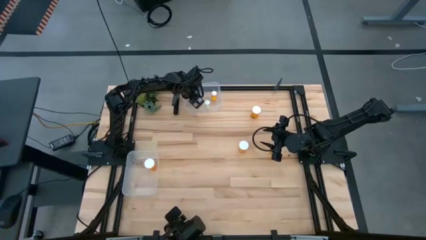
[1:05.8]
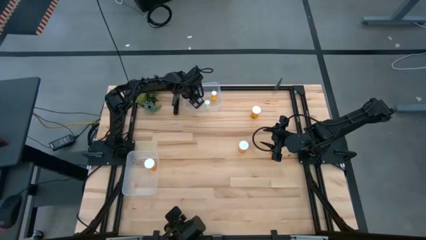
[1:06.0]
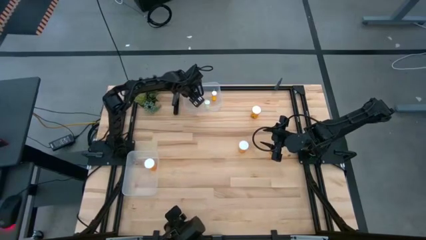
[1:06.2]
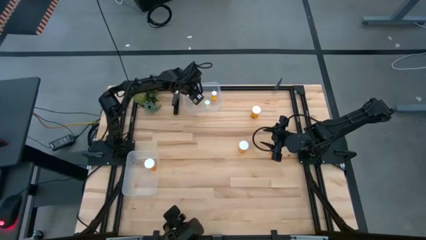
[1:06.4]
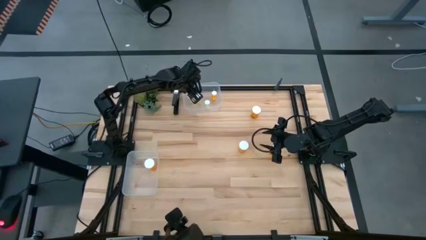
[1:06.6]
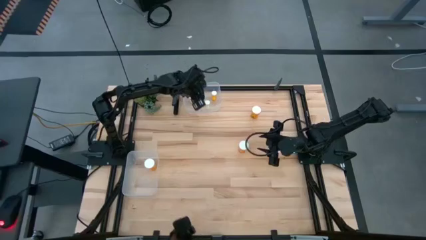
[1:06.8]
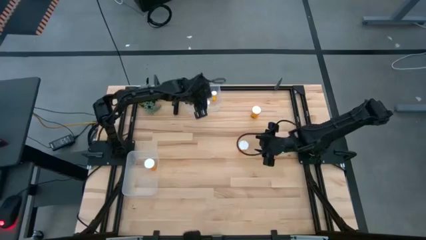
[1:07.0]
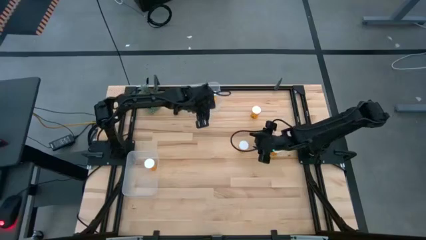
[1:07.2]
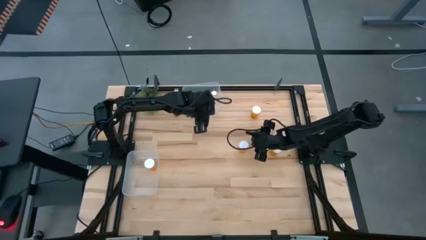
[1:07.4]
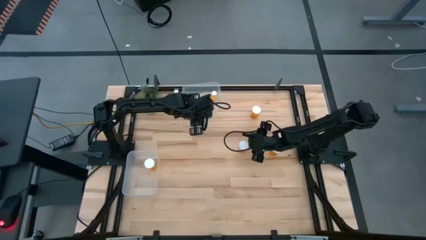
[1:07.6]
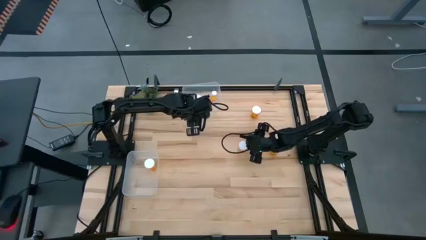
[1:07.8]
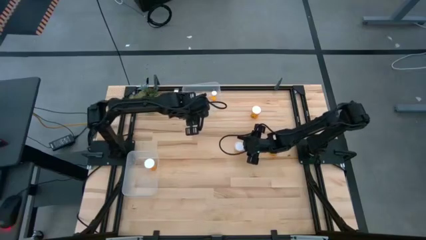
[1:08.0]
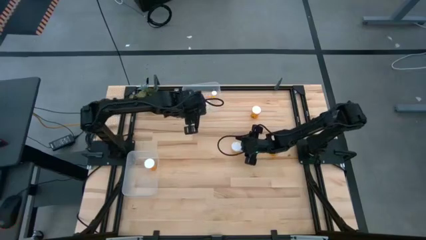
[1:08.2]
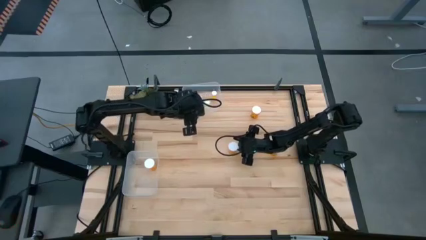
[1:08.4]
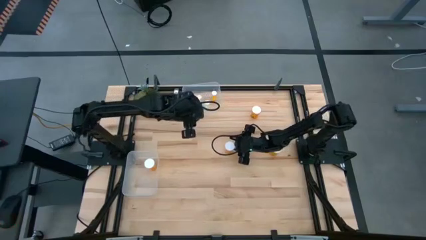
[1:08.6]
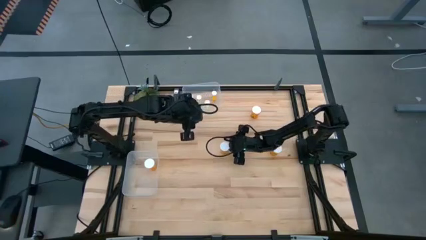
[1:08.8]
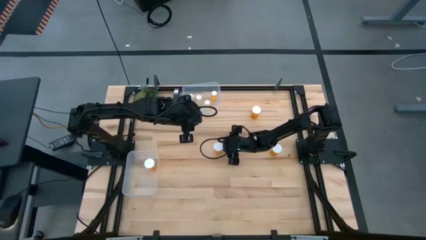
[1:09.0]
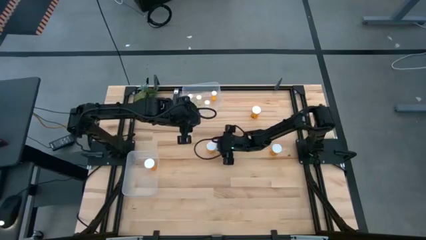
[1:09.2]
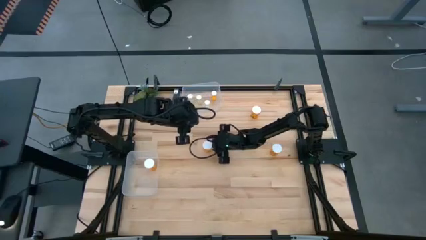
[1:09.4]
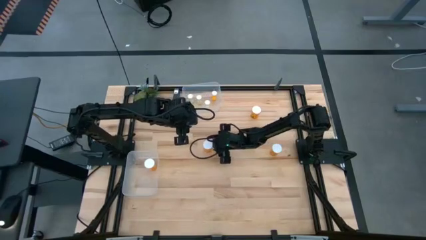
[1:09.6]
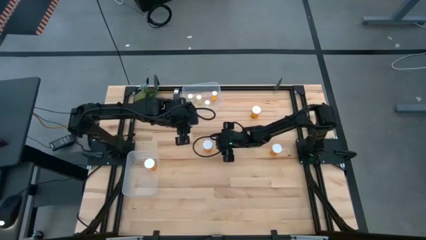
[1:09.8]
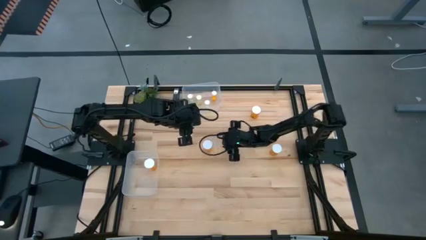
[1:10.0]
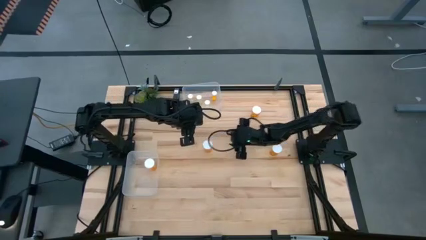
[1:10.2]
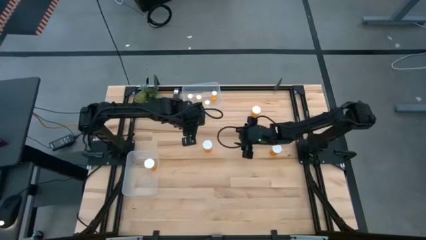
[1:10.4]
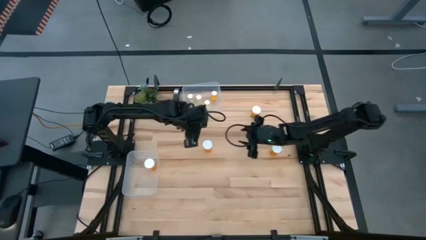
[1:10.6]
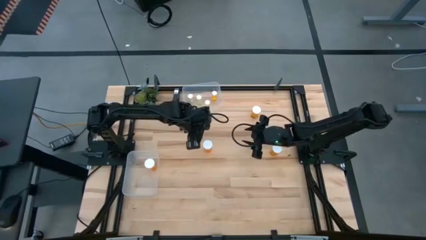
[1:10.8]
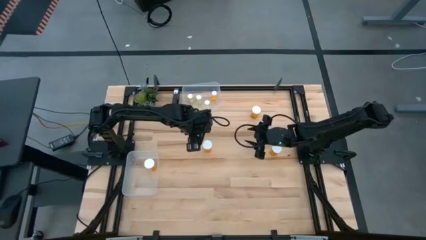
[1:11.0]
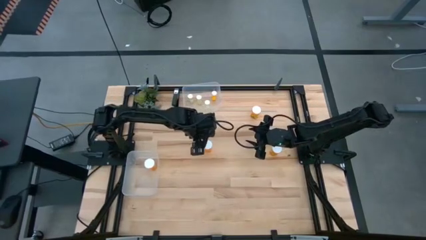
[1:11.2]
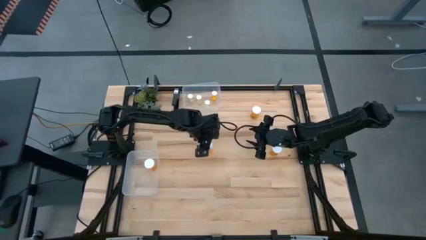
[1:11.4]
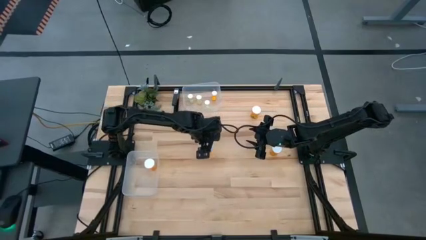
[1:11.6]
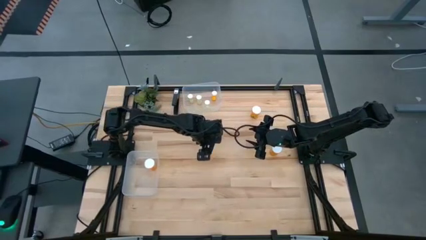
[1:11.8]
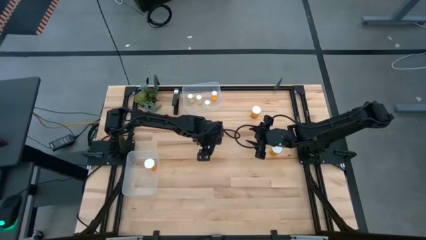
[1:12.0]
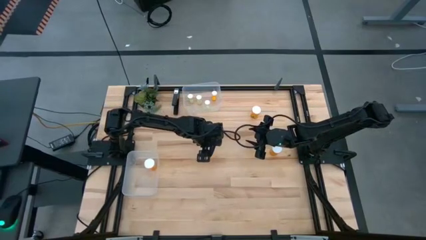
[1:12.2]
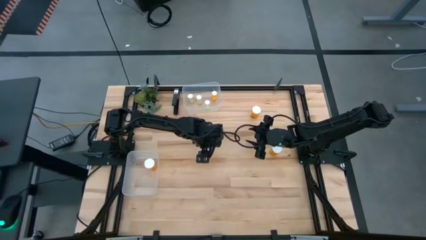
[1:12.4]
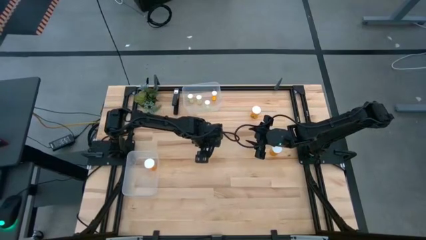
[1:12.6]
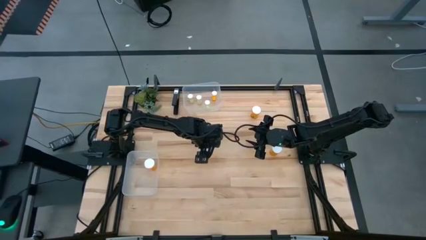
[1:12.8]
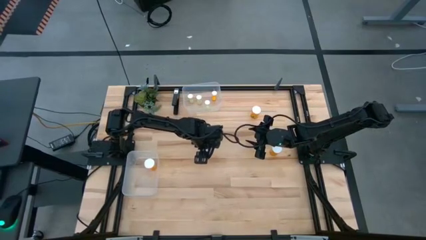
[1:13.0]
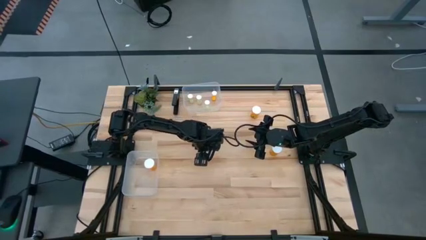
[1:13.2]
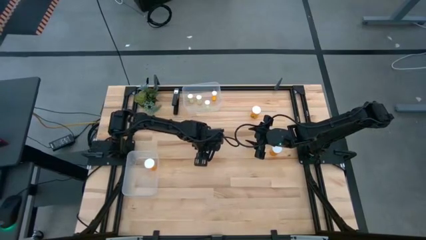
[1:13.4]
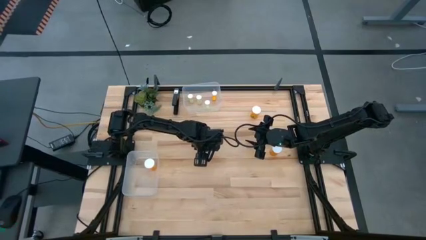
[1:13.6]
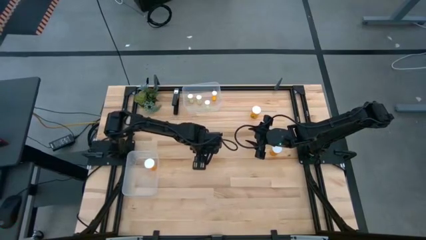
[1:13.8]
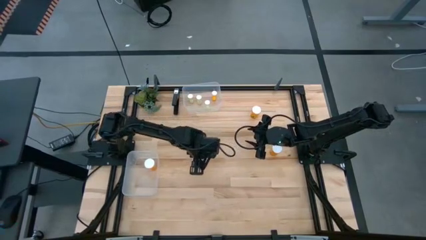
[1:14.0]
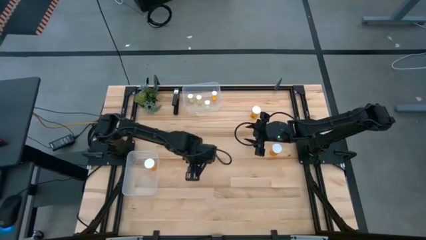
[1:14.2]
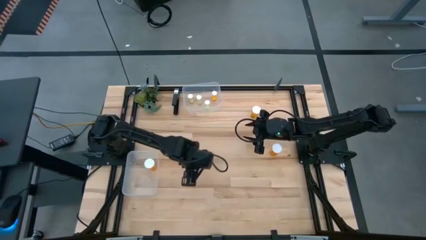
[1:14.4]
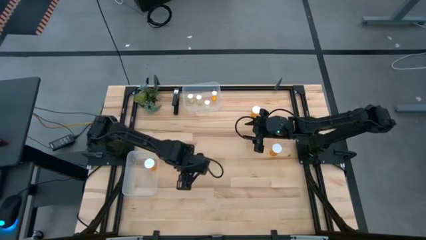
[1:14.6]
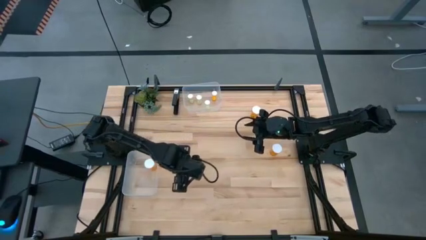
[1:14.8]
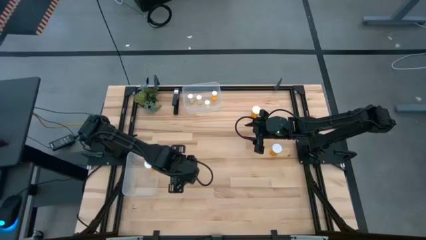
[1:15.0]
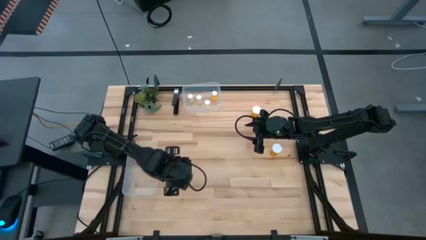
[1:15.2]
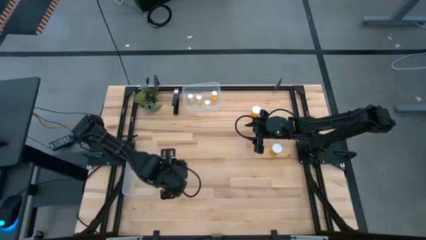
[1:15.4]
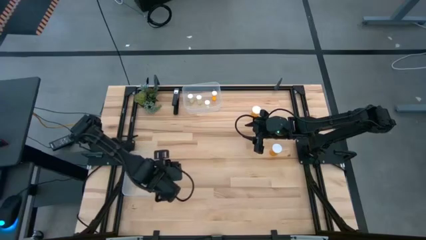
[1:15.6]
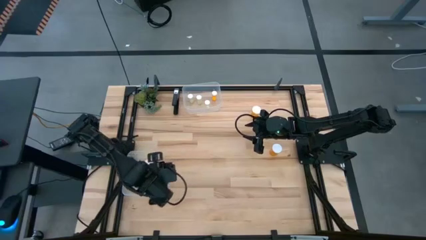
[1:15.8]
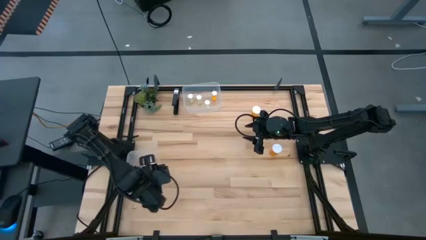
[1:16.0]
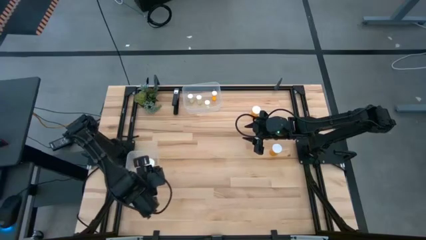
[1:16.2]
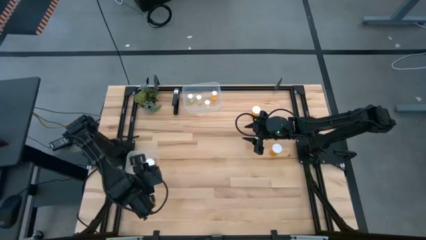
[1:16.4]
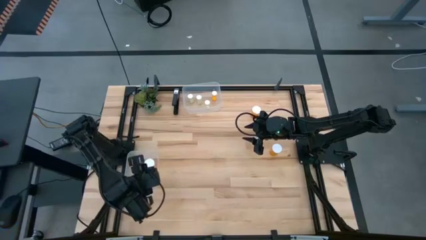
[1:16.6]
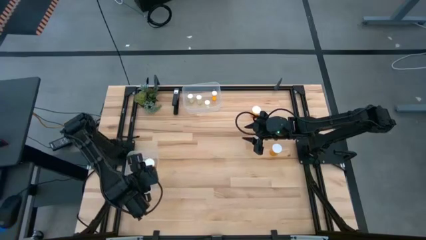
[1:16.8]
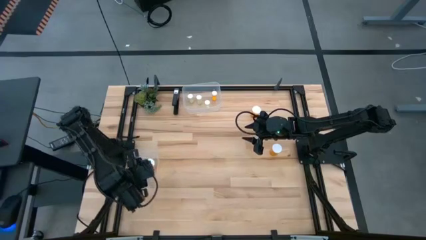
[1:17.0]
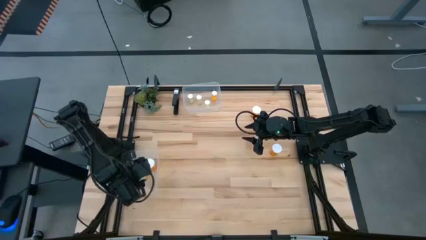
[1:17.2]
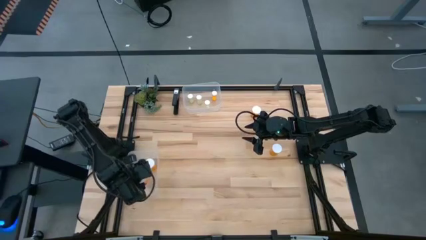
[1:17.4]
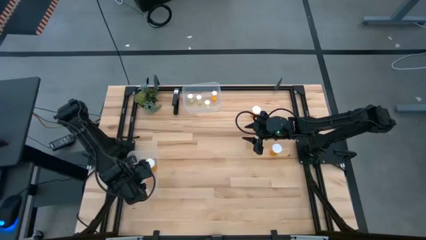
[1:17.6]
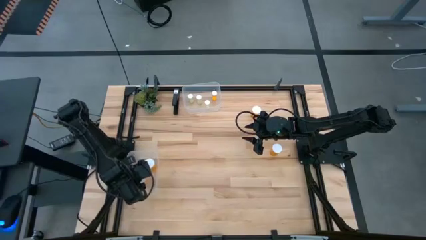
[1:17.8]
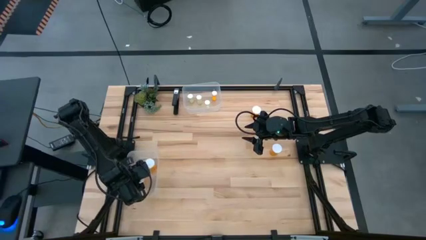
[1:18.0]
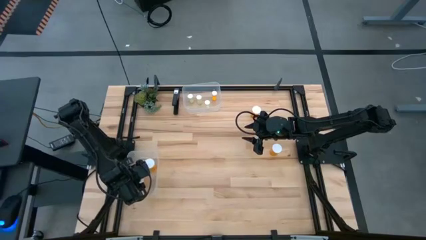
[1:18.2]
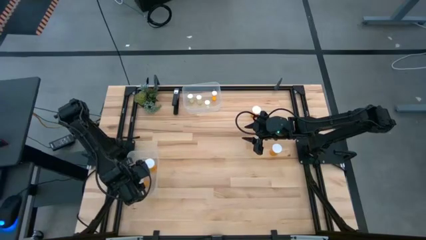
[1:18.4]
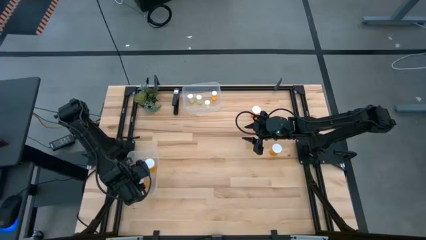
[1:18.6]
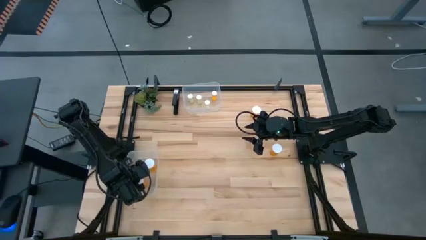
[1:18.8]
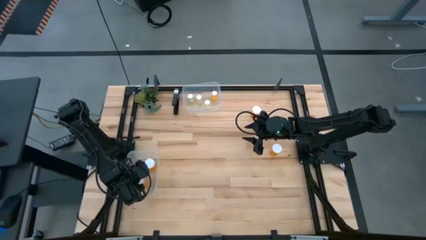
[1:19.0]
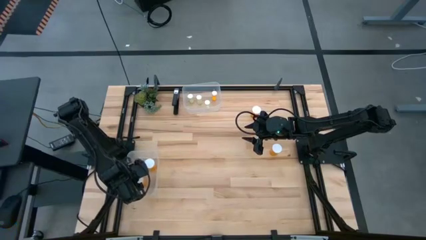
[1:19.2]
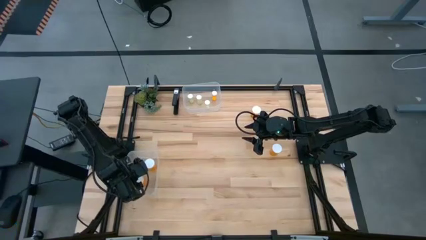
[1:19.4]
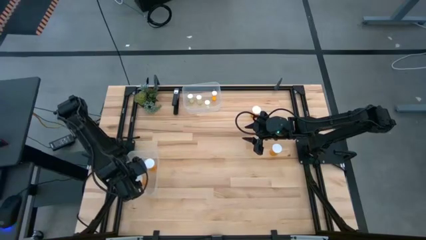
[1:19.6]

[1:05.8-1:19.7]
Task: Pick and place medicine bottles into bin by pill shape (circle, oval)
Put the bottom left big orange pill bottle into the bottom transparent bin

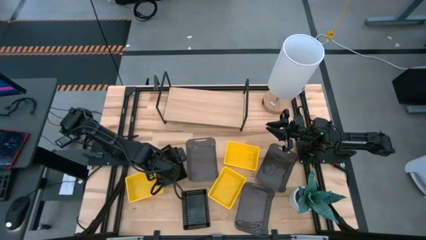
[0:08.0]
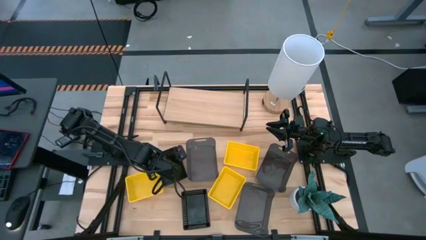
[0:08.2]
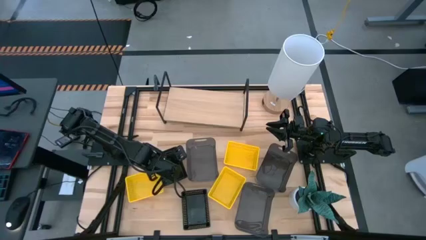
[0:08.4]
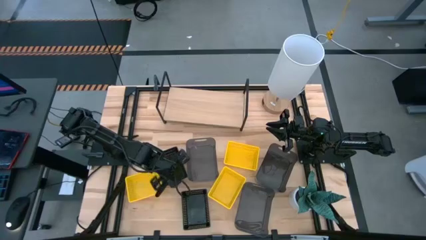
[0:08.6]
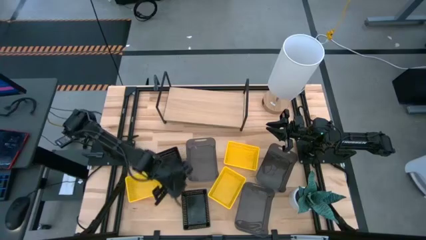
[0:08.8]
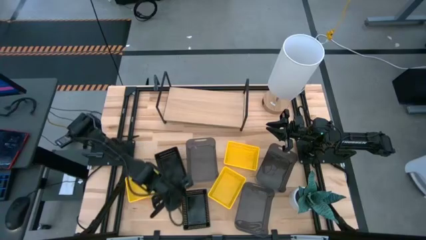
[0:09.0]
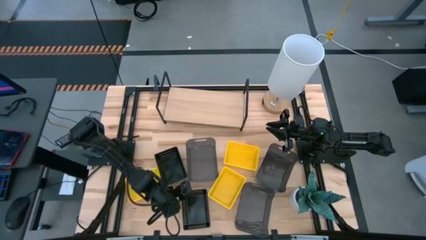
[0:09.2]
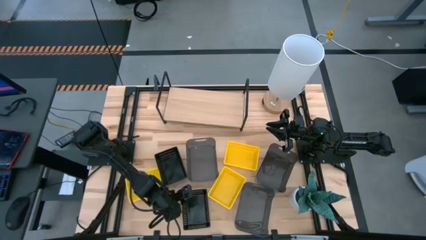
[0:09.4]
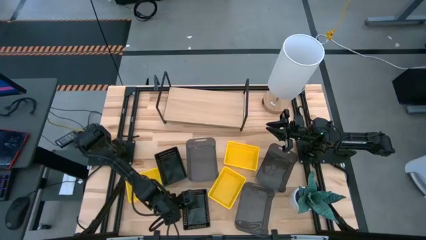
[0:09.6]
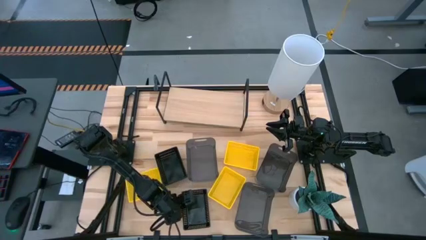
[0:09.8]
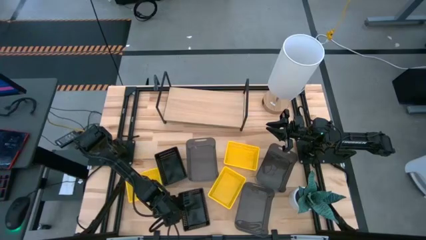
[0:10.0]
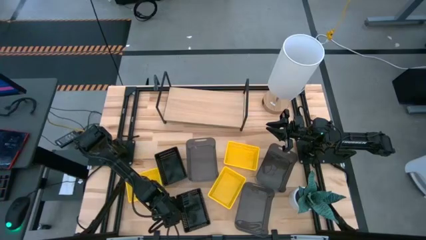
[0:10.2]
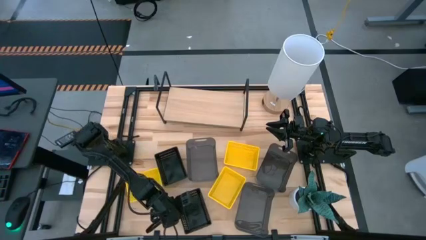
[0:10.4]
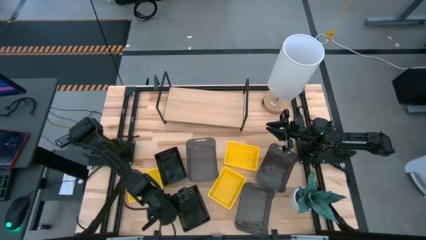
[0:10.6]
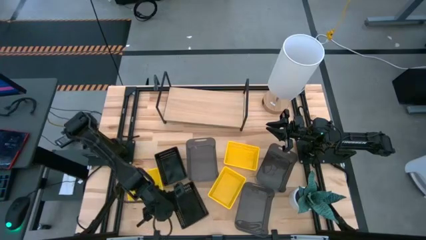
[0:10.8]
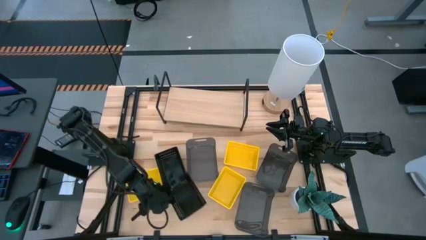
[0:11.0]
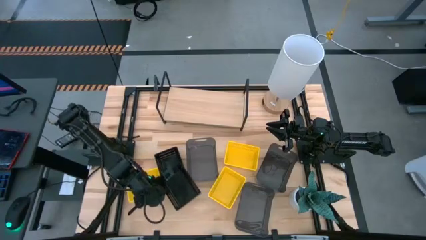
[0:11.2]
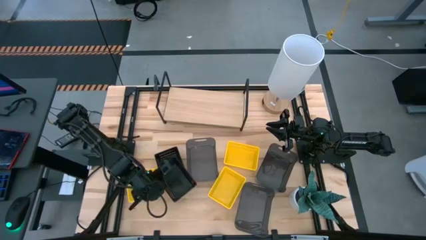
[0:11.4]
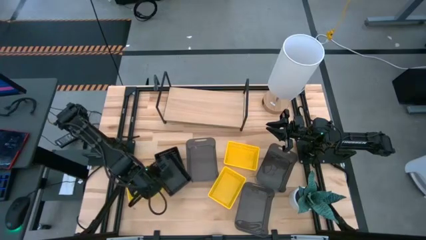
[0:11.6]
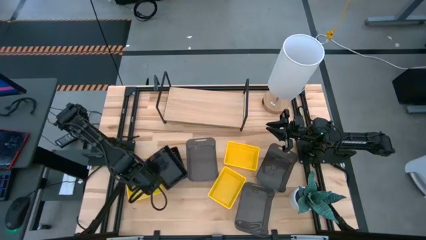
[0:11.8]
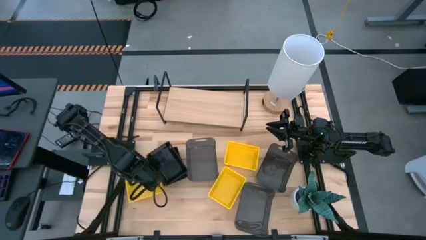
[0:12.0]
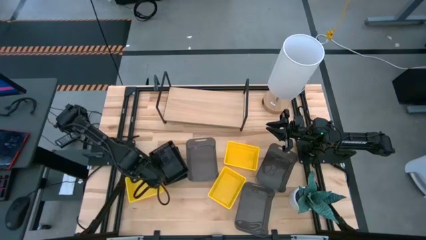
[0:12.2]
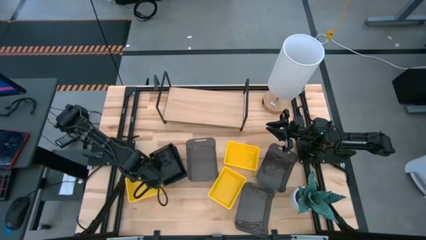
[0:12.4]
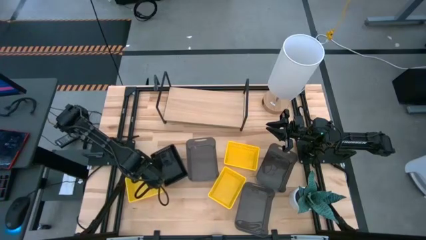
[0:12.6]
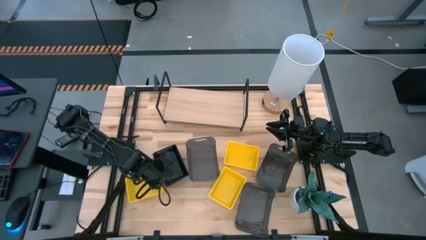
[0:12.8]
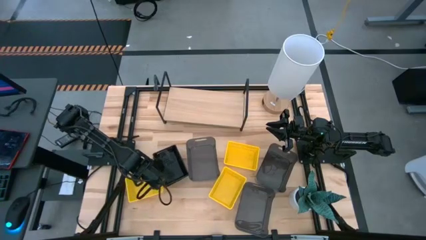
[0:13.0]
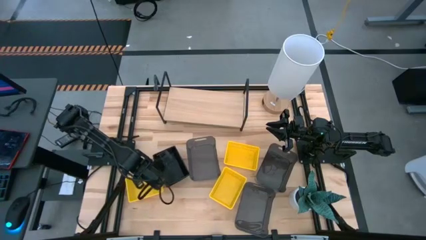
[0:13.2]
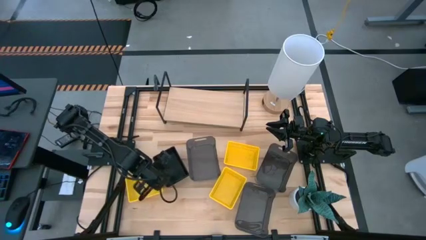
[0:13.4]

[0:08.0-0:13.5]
Task: Stack baskets on shelf by color
Stack the bottom black basket on top of the other black baskets
